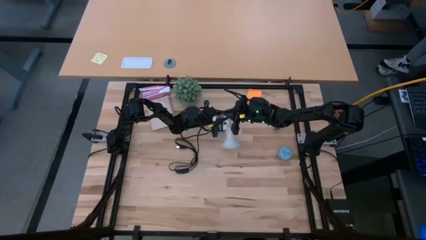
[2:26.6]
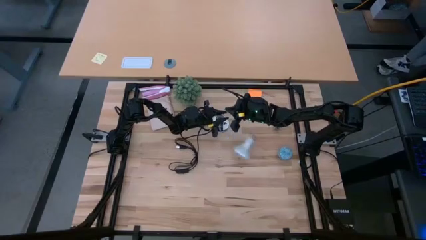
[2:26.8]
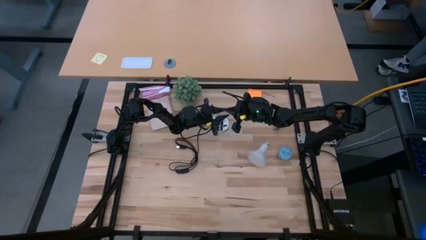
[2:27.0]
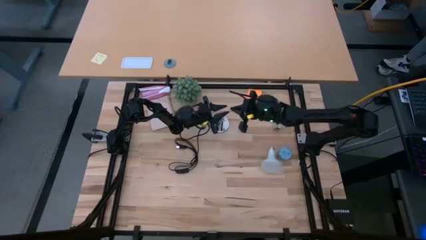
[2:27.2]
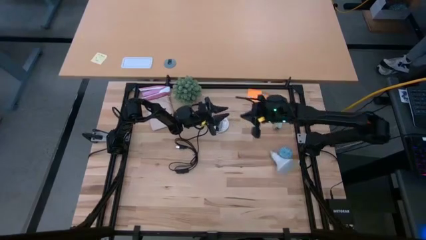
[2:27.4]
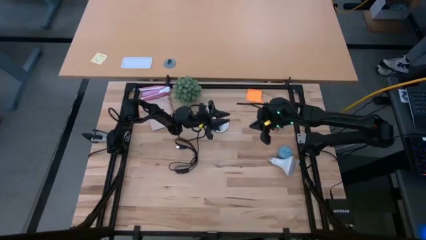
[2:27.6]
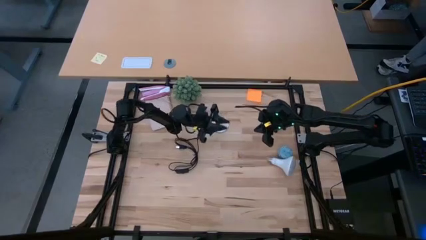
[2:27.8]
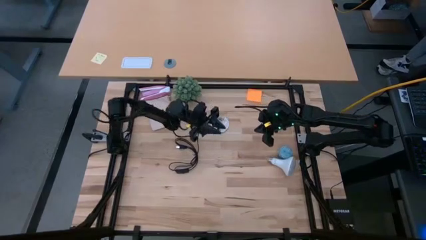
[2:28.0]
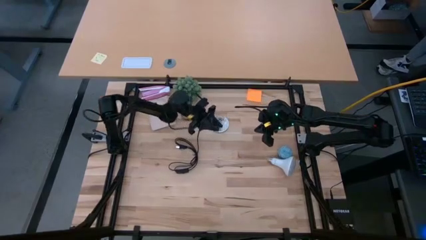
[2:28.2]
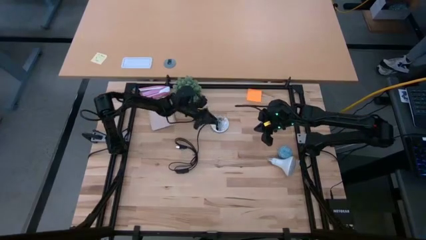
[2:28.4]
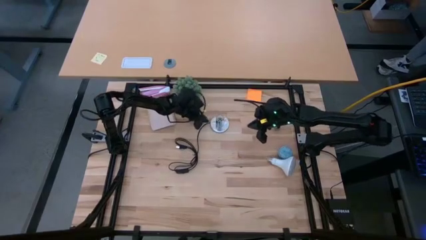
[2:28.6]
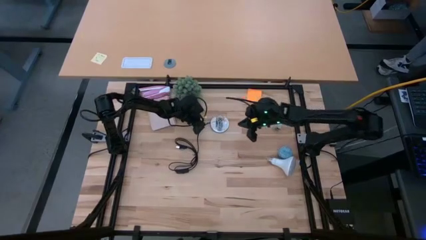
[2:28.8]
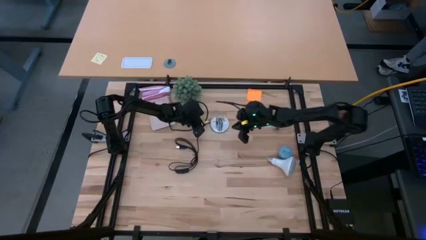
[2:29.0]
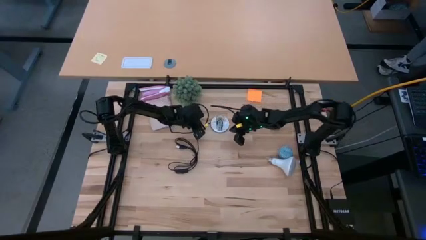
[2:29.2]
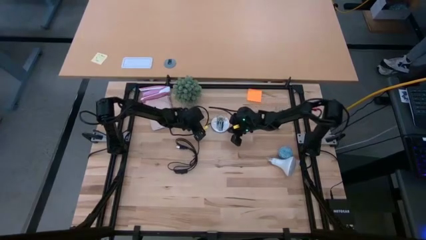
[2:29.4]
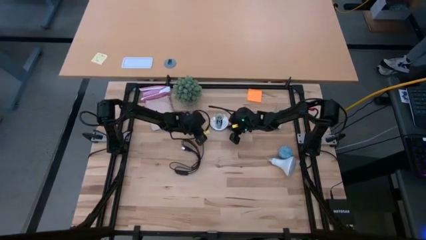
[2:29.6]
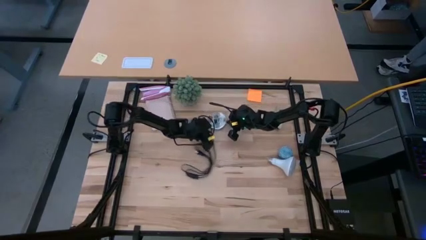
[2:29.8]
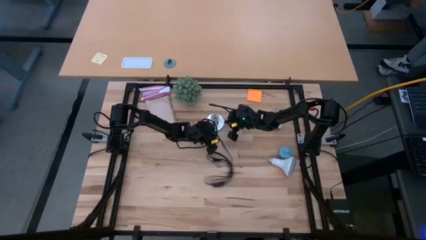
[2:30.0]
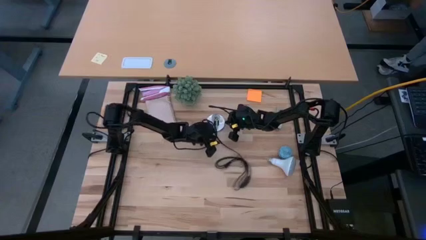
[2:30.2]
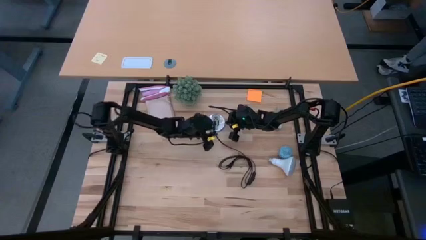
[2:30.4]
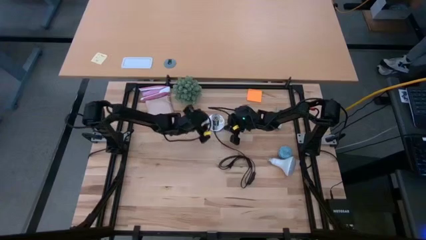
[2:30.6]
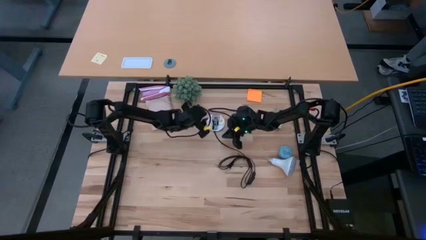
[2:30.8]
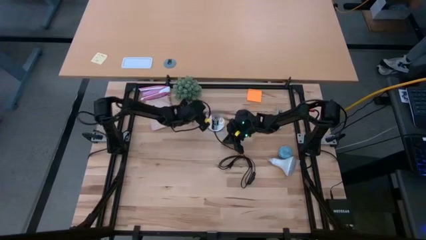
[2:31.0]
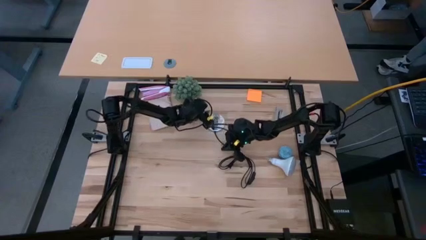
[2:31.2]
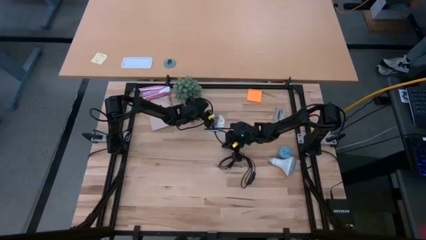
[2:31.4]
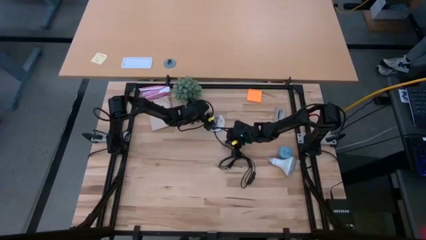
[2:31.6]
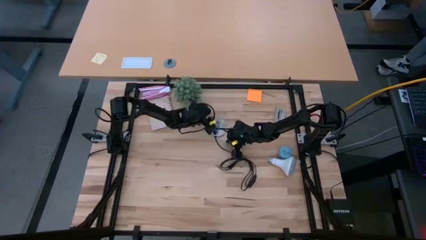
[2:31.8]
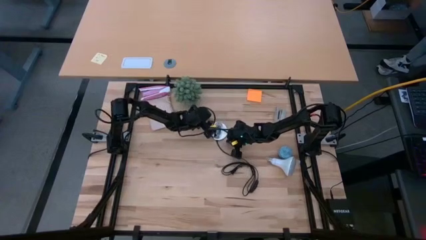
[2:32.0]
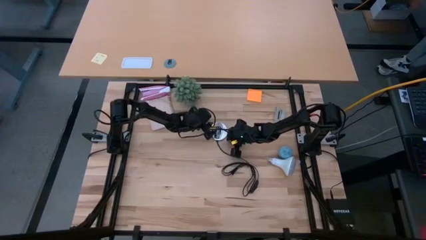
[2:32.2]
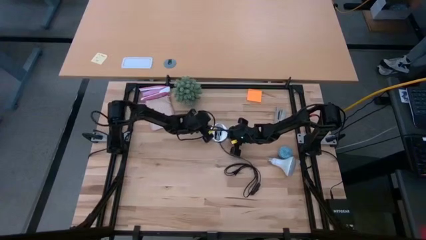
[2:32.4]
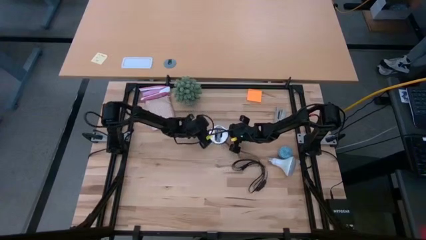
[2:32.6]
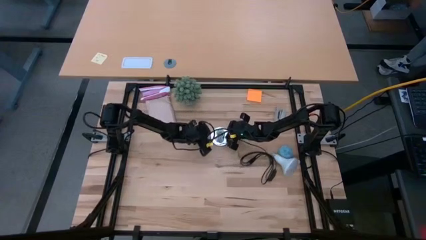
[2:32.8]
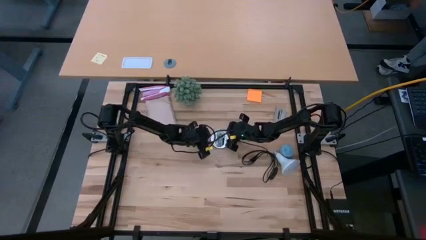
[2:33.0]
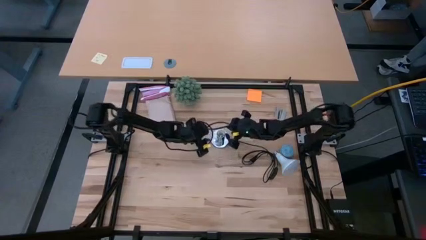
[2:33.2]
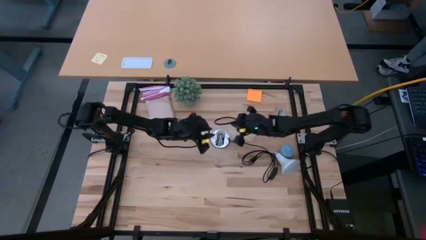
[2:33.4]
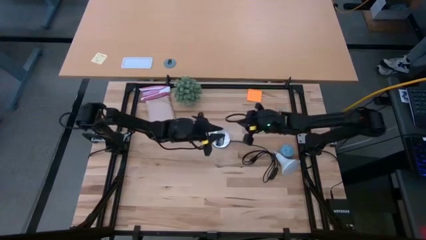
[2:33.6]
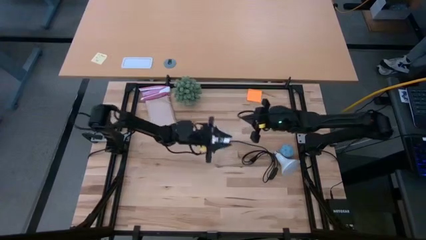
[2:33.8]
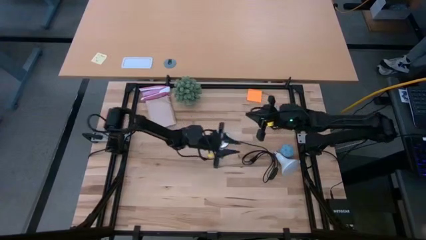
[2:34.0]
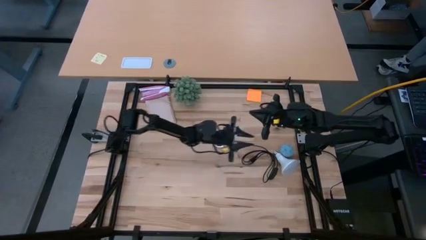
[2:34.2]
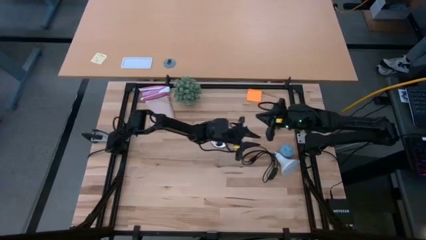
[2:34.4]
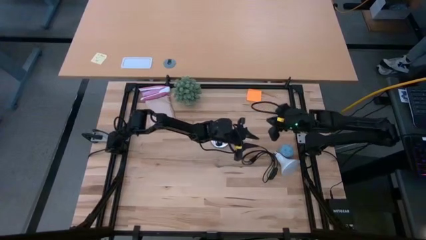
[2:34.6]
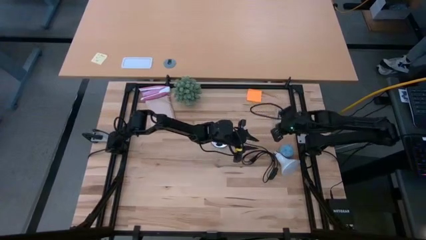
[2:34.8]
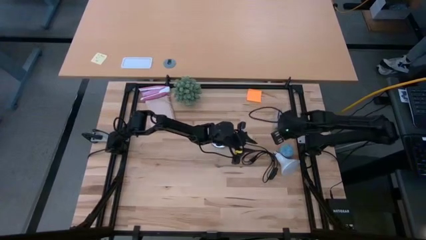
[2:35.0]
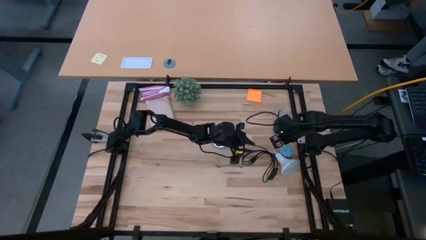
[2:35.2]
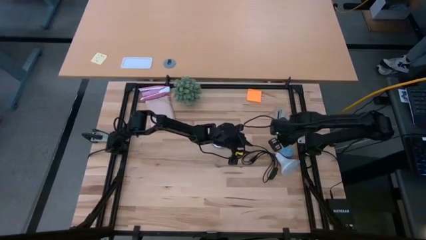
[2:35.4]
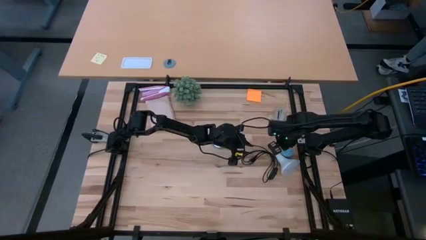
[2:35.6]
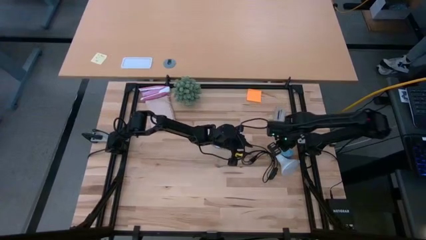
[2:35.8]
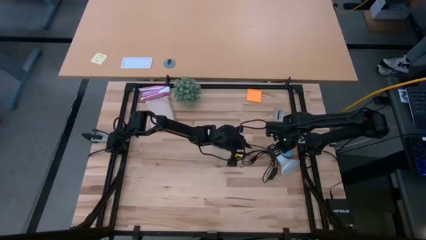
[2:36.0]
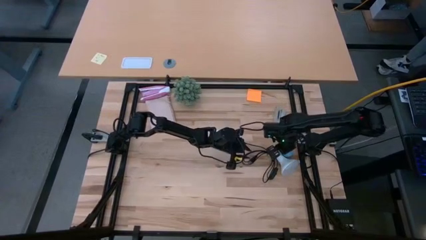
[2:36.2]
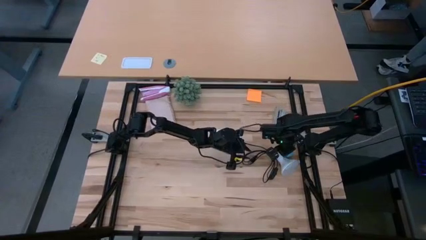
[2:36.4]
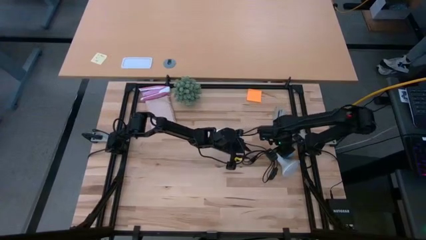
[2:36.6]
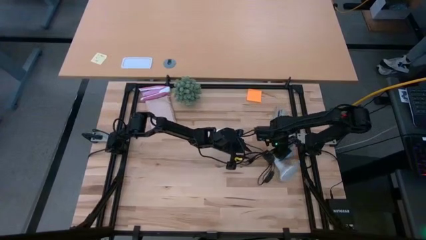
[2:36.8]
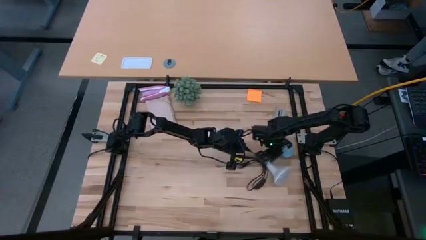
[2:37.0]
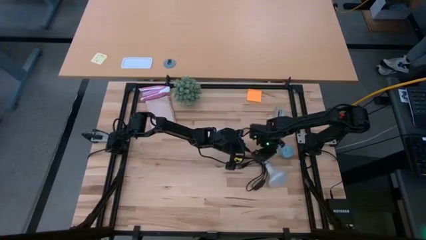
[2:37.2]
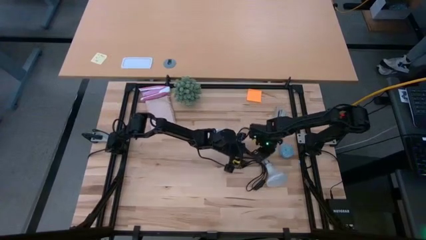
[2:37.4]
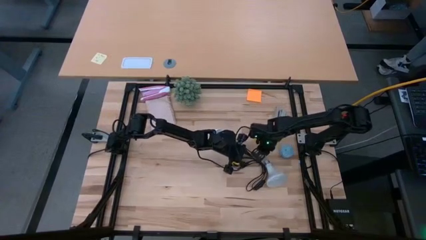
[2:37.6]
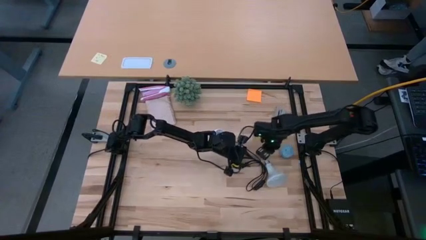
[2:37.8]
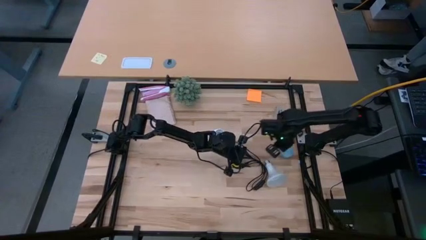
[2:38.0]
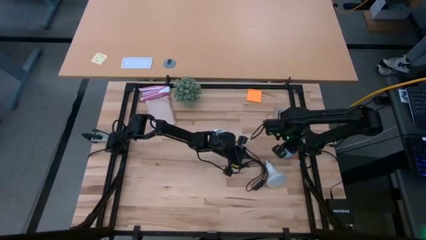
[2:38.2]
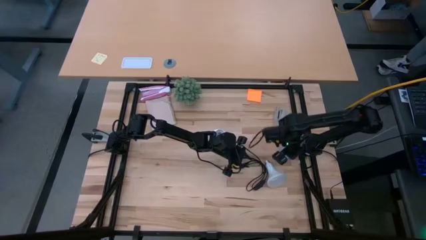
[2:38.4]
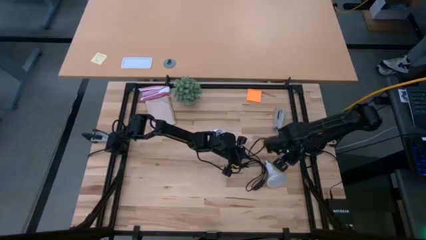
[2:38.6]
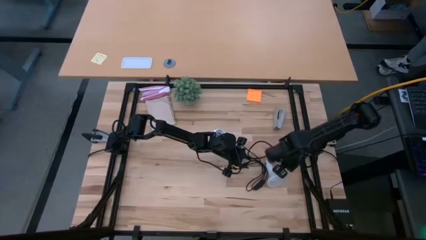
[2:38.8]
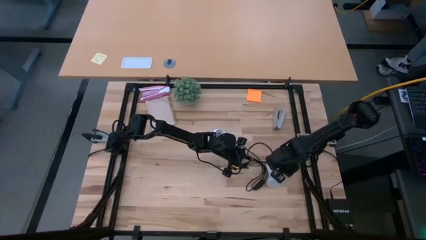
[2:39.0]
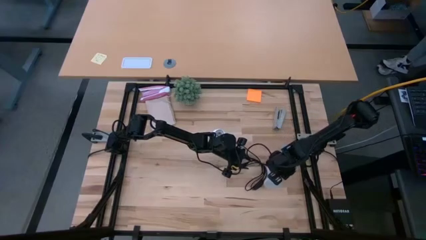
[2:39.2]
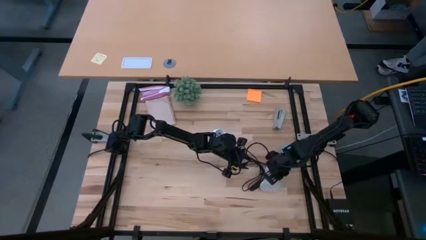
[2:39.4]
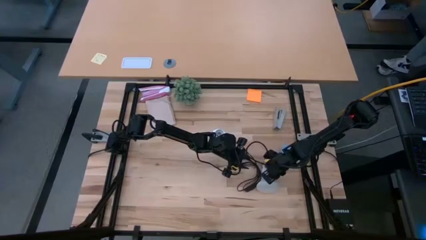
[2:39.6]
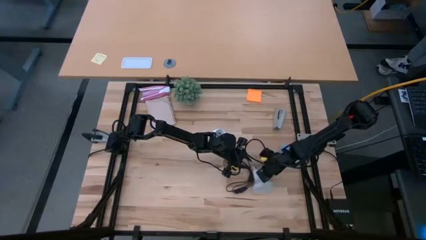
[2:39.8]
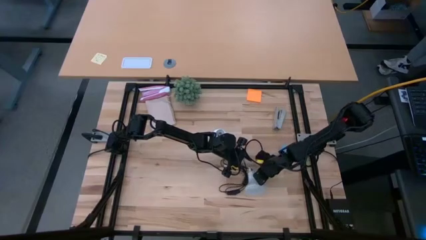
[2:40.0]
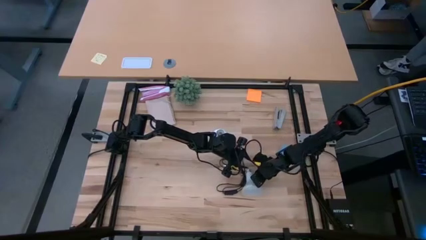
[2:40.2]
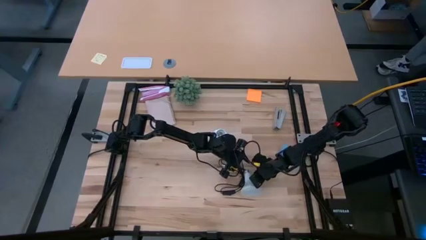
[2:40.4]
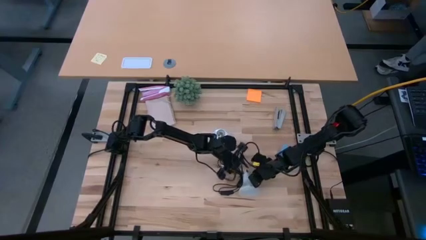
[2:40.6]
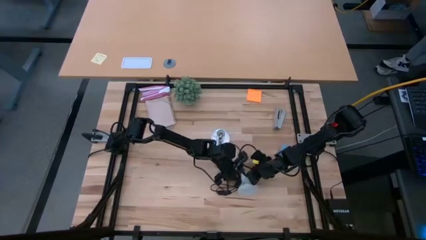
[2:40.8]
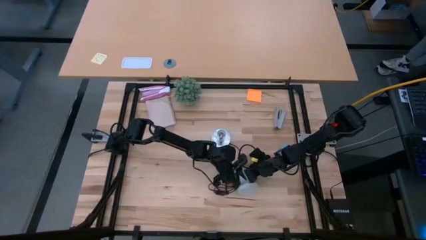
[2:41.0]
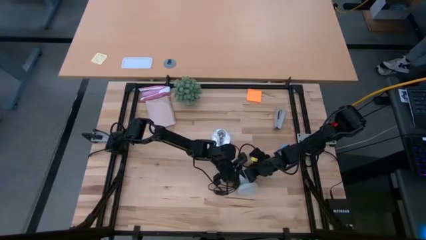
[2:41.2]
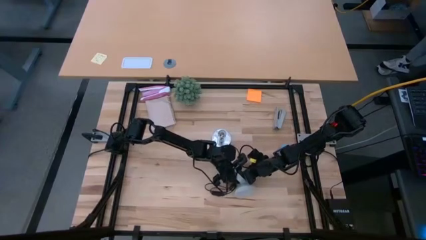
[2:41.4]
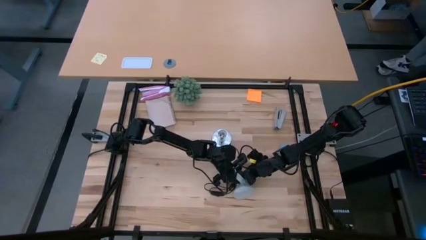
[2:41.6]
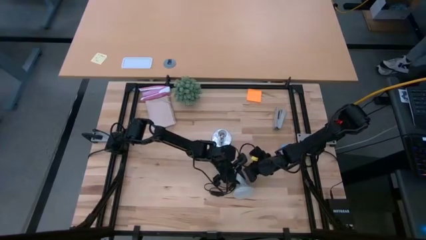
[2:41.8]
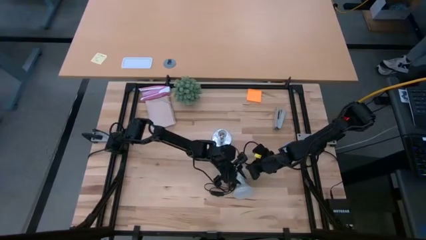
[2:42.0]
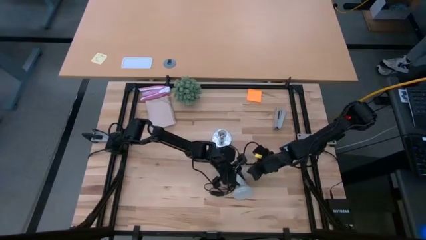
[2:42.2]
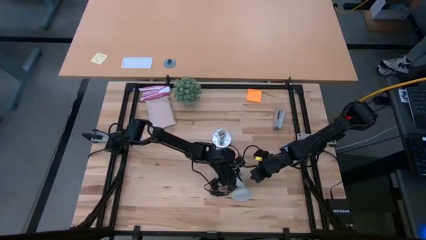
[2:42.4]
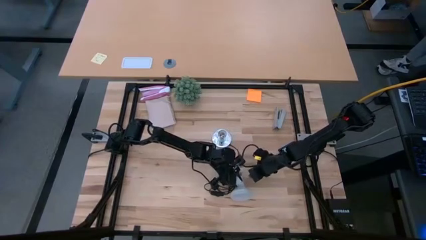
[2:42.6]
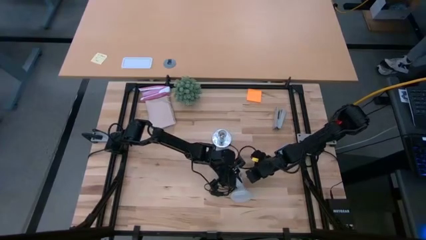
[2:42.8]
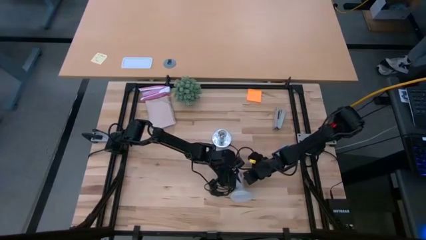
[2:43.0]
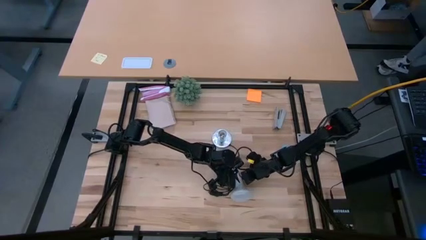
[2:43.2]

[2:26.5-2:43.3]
Task: Screw lightbulb
Insert the lightbulb into the lamp
